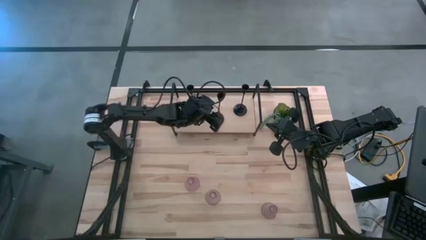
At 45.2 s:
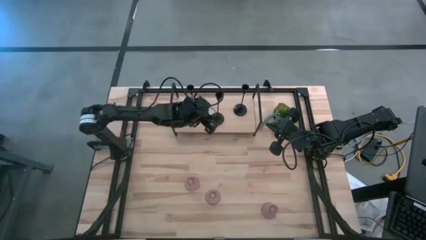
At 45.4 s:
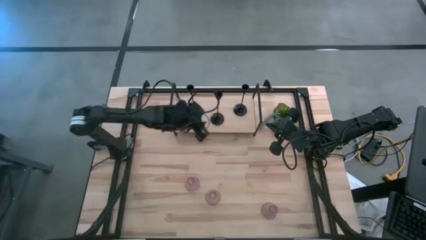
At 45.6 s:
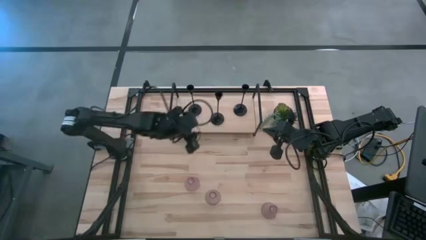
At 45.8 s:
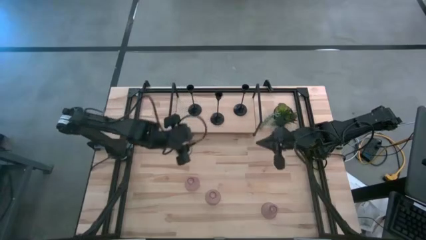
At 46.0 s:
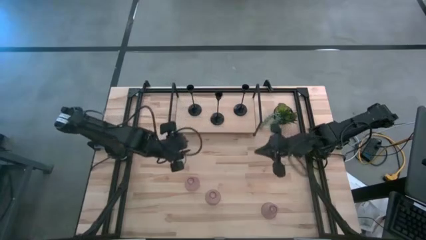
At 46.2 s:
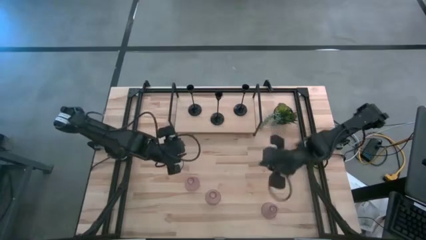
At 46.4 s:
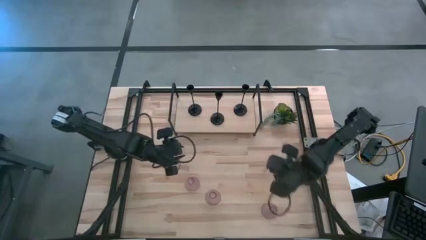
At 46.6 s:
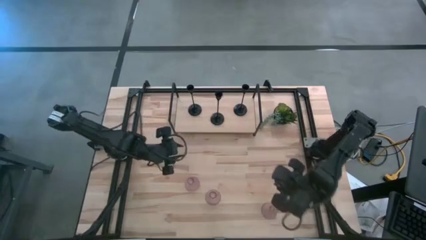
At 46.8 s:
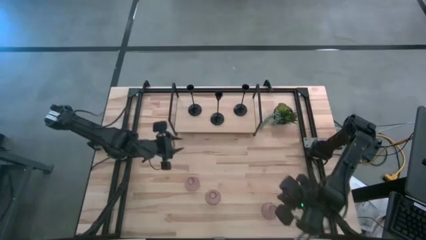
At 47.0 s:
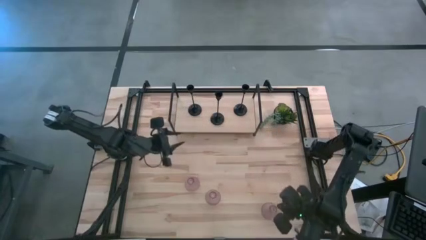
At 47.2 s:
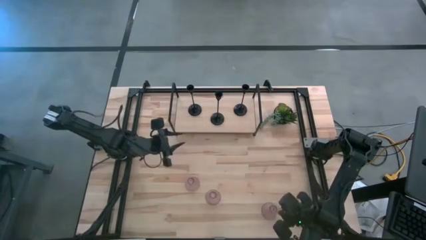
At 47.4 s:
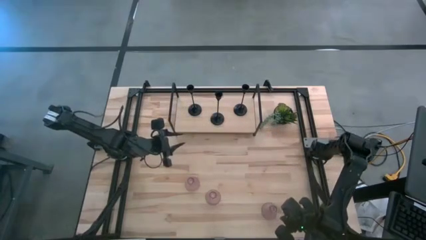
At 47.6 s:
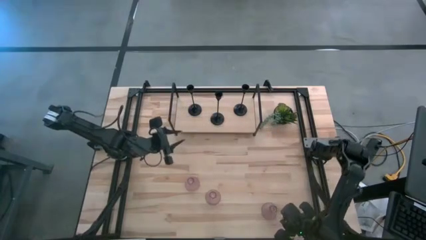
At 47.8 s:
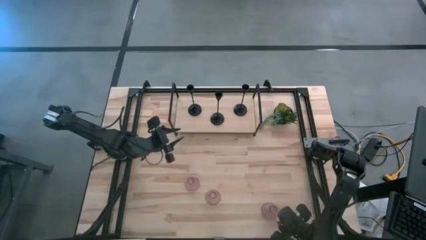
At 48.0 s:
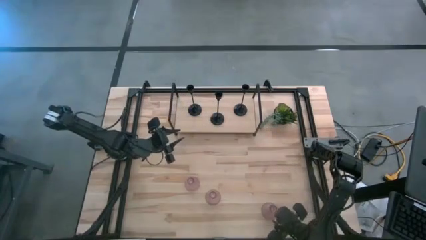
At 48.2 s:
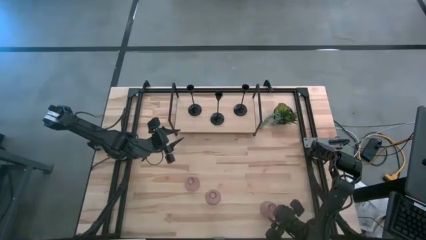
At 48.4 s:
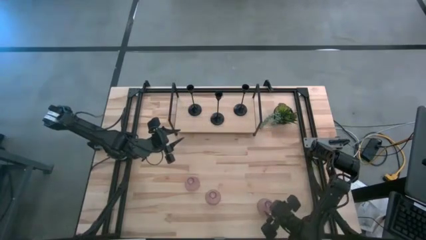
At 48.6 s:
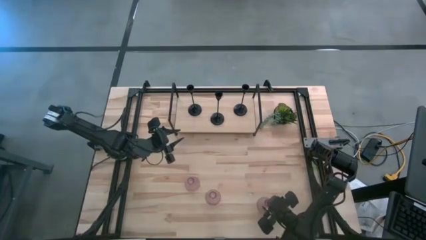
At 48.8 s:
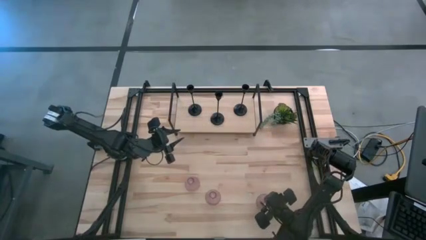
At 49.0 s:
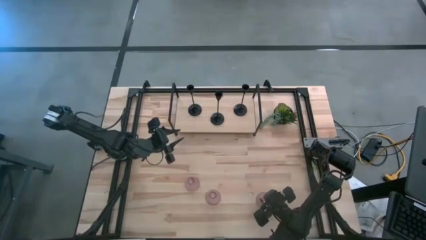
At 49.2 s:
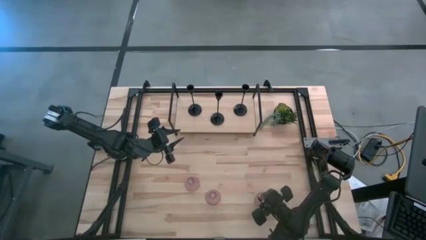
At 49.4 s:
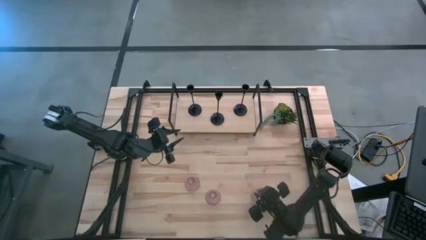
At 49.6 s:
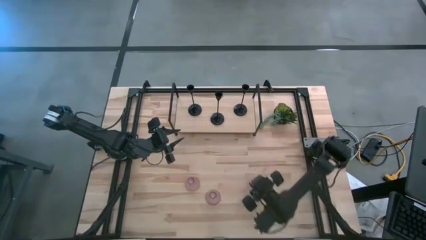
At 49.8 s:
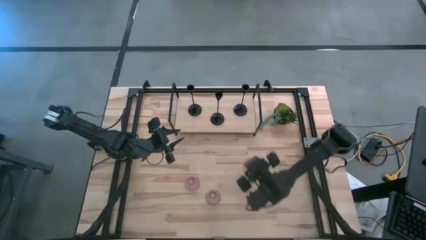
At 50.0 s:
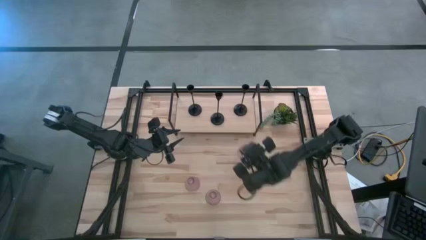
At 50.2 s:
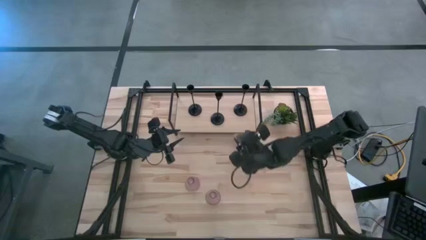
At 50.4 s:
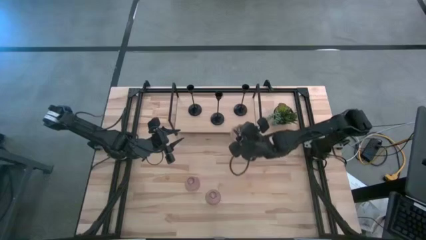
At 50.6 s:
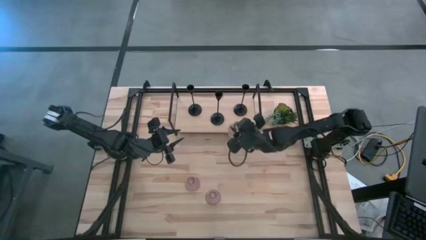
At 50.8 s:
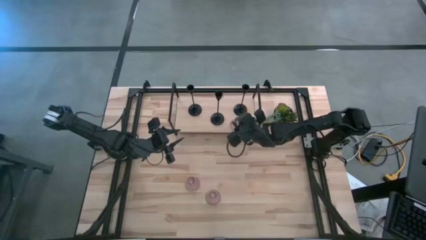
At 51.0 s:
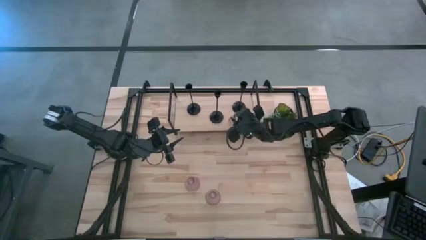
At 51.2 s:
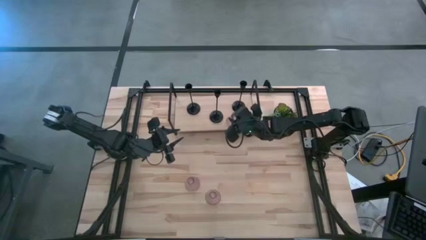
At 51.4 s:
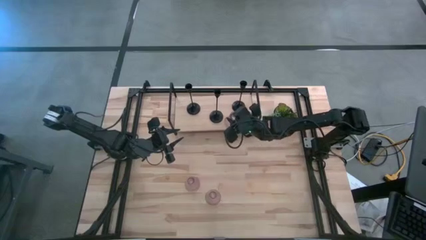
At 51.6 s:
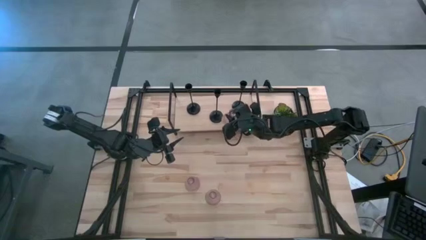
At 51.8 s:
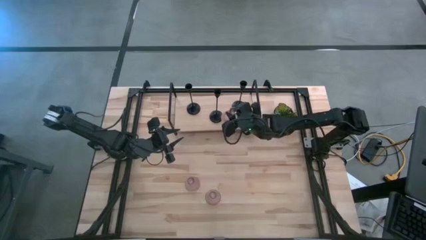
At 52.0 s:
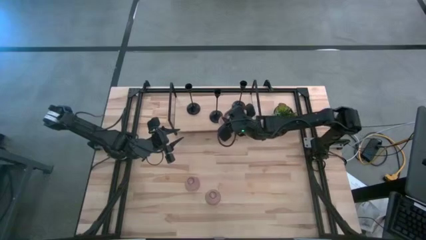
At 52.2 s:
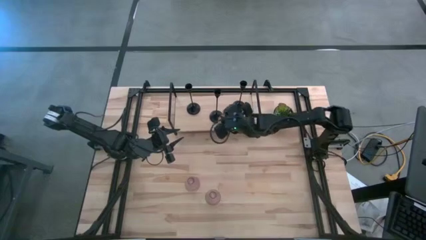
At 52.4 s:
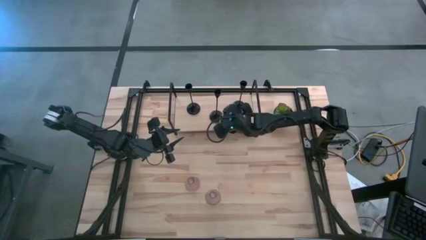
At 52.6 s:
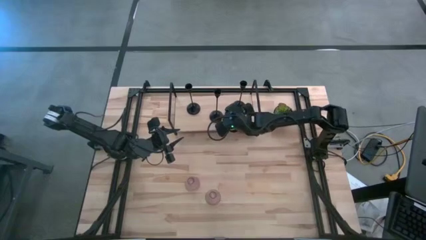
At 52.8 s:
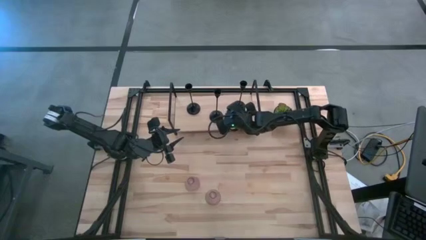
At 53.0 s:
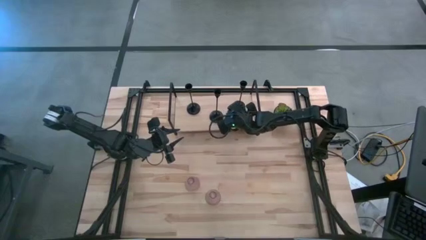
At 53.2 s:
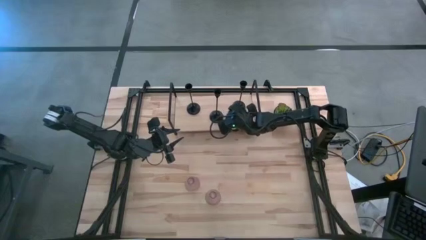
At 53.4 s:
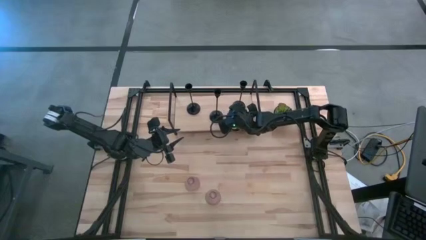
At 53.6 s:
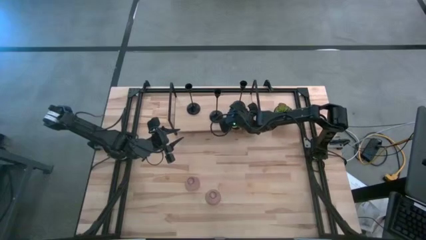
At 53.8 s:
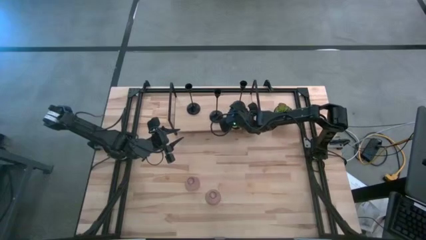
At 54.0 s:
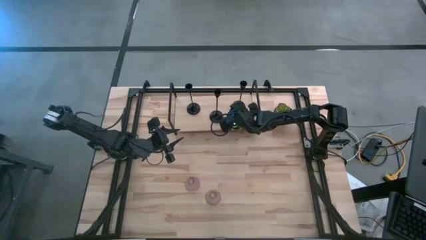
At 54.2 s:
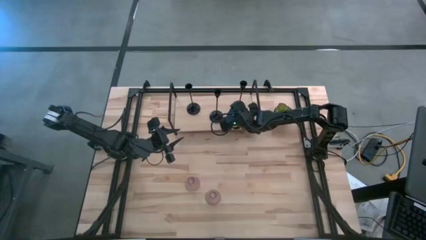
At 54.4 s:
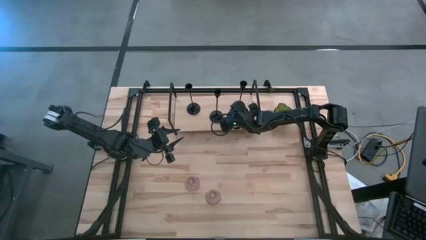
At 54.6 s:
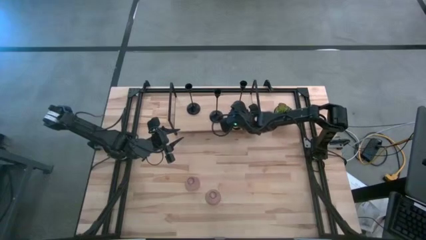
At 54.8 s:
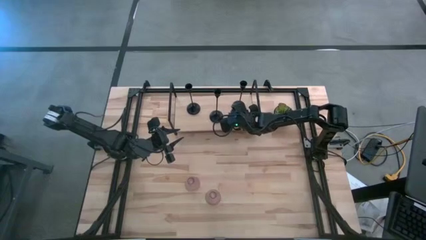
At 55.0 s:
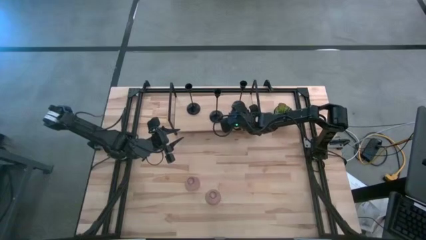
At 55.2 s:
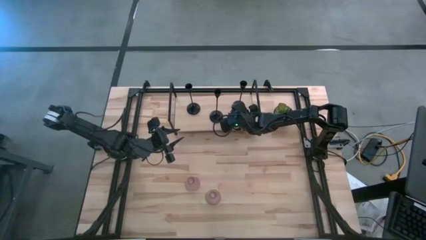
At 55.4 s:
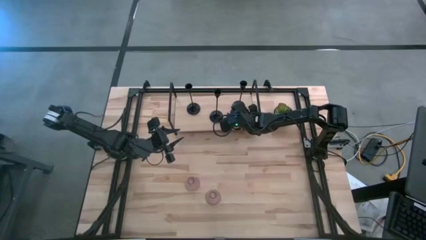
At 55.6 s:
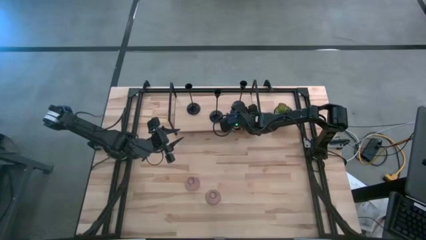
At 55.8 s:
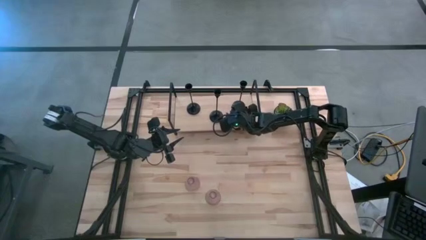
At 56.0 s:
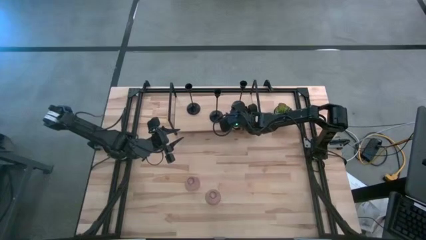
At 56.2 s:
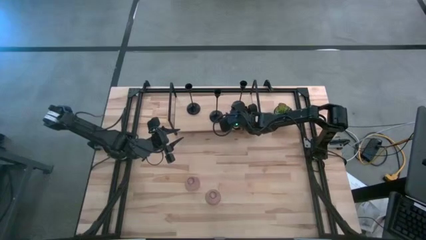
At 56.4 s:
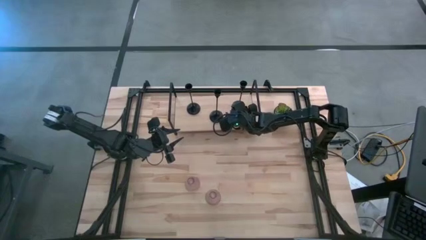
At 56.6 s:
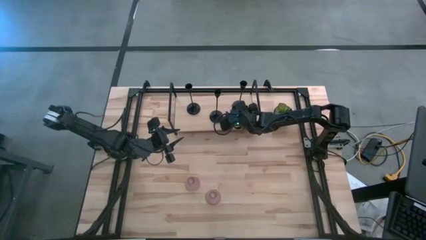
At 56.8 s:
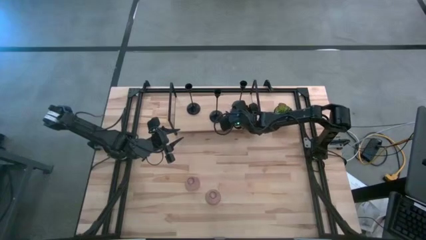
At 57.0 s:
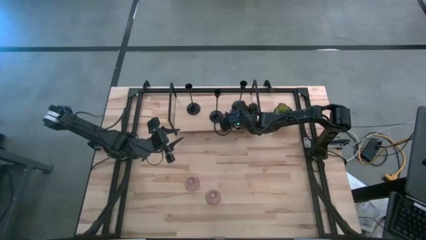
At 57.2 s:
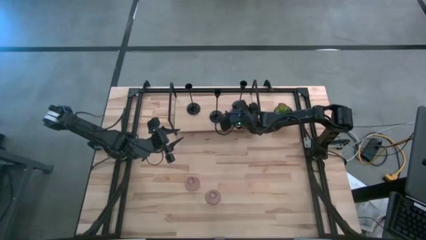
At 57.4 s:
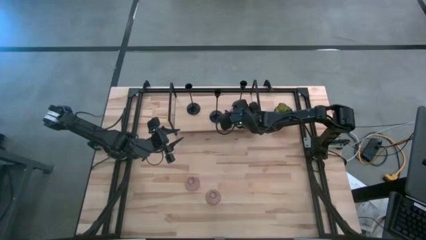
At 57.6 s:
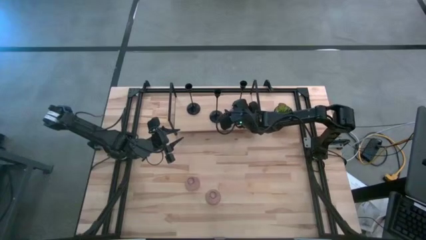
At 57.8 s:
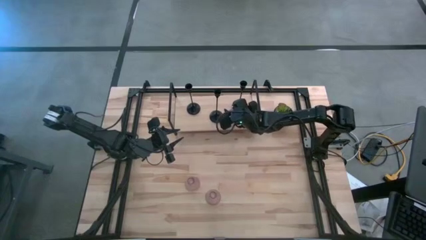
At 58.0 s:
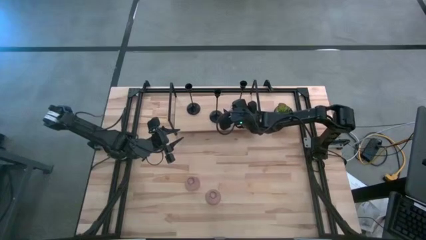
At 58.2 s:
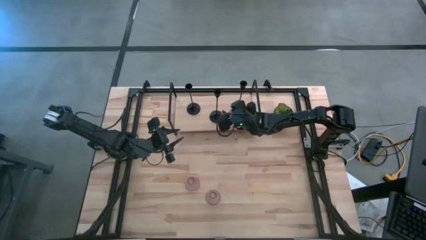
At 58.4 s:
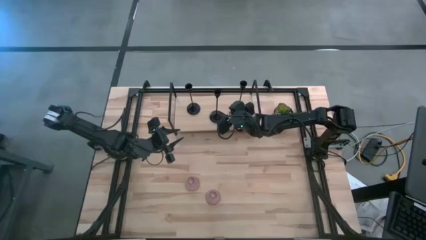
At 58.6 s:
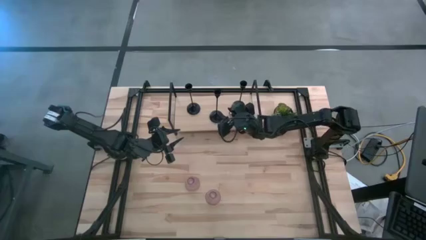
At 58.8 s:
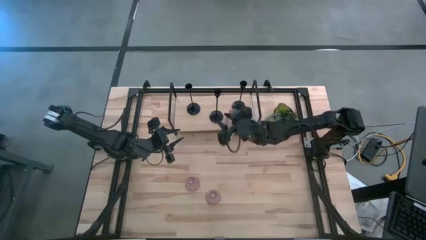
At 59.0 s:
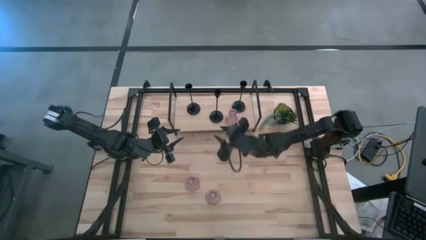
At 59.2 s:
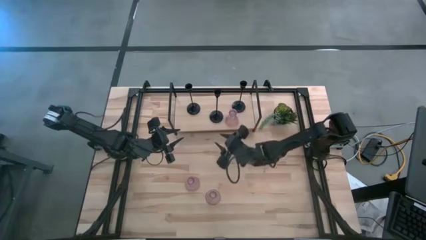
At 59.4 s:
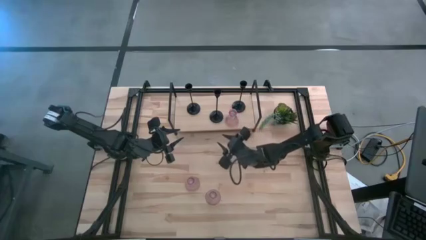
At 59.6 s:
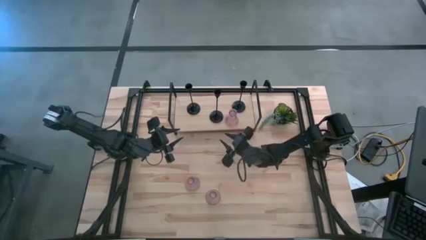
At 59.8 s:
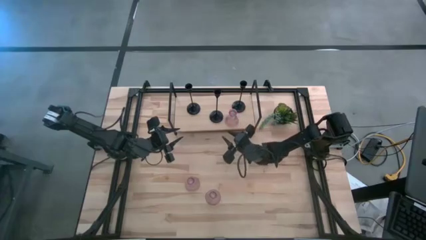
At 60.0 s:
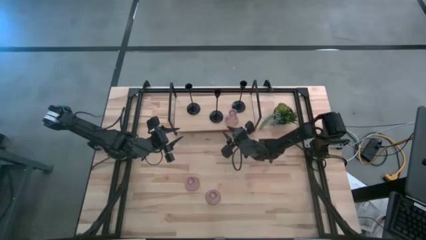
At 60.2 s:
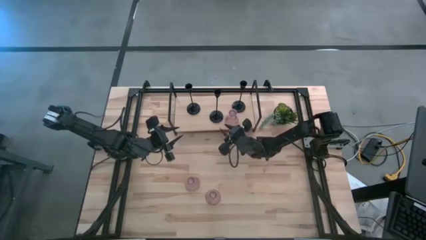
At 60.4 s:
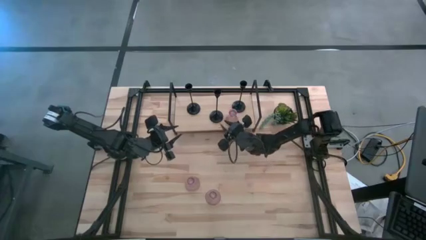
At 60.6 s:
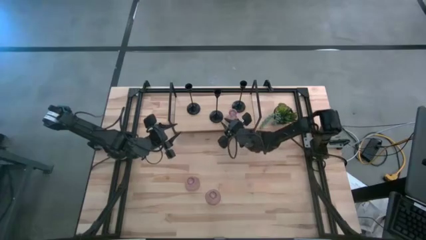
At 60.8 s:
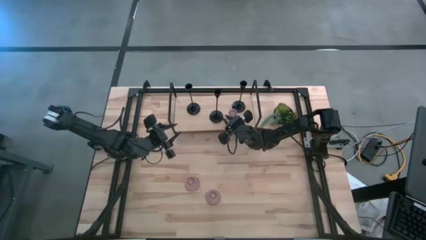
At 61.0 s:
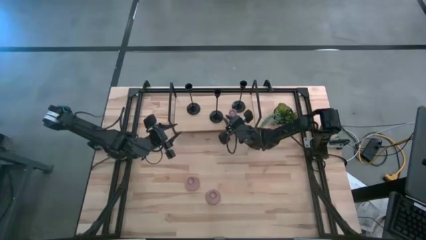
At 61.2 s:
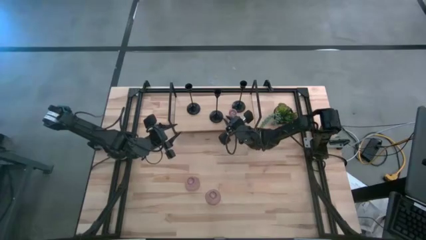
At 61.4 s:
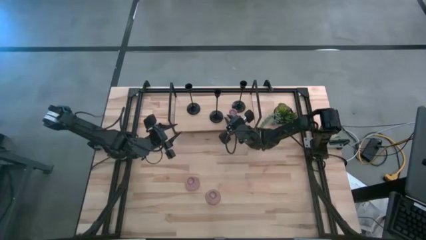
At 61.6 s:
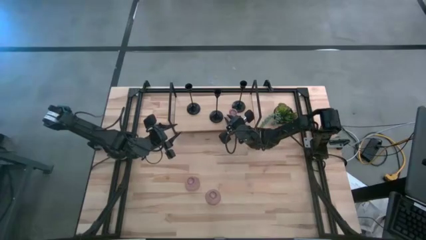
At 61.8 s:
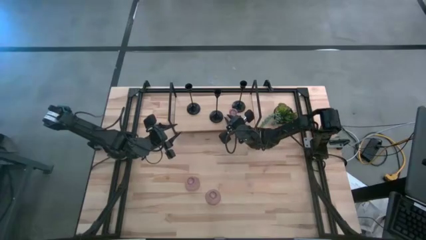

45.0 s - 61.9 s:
Task: Pick & Place candle stick holders
Put the bottom pink candle holder on the shelf
